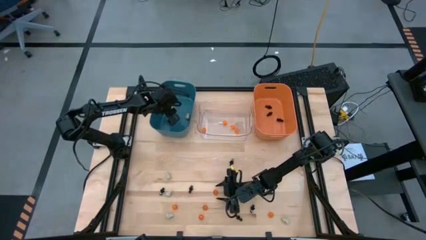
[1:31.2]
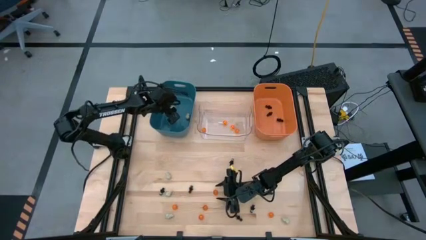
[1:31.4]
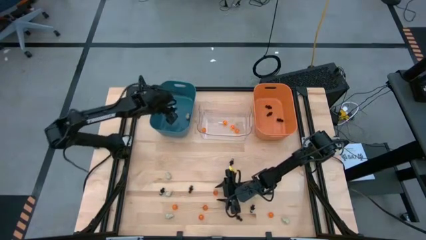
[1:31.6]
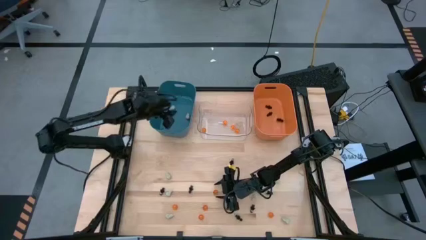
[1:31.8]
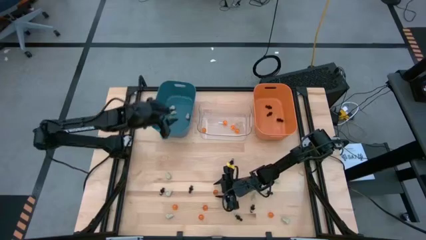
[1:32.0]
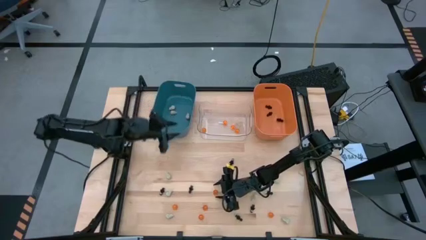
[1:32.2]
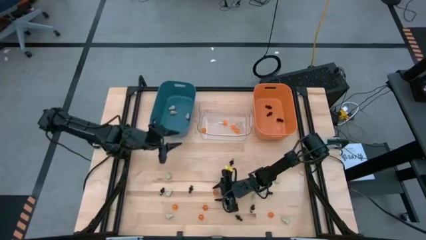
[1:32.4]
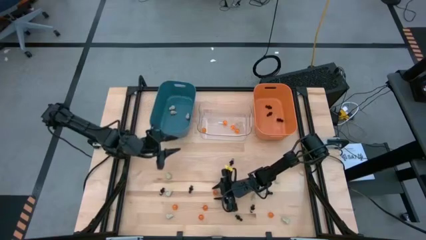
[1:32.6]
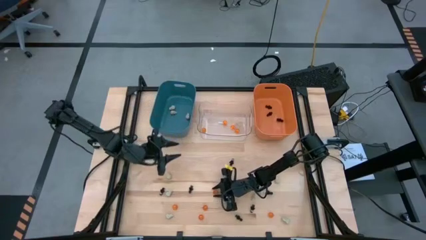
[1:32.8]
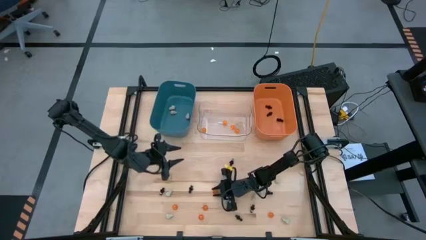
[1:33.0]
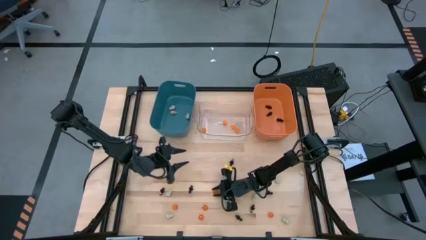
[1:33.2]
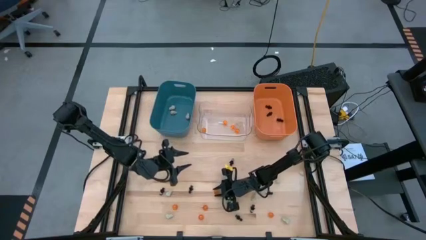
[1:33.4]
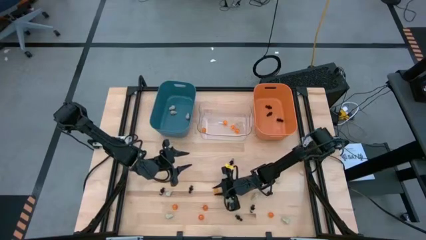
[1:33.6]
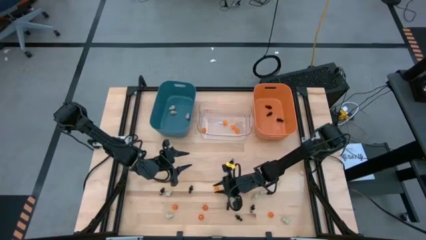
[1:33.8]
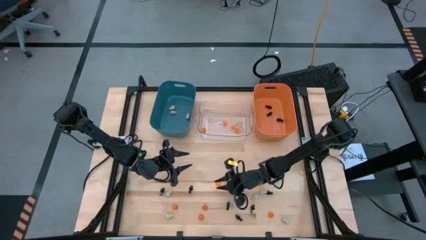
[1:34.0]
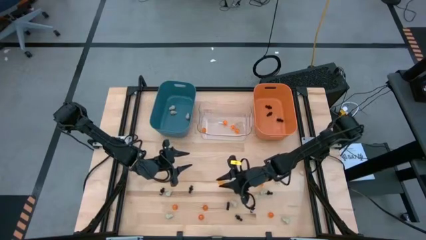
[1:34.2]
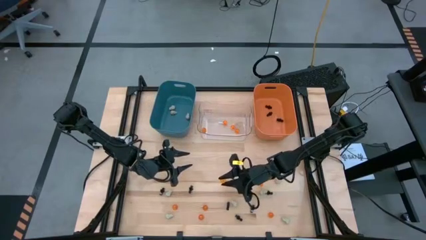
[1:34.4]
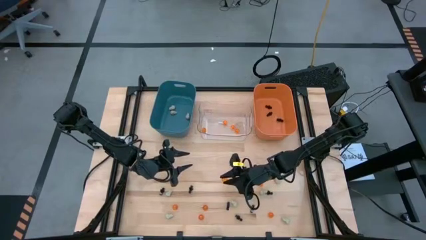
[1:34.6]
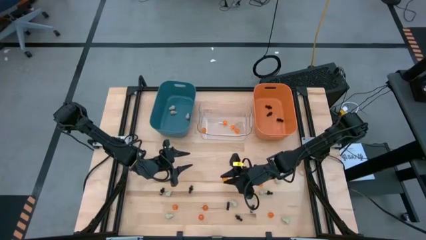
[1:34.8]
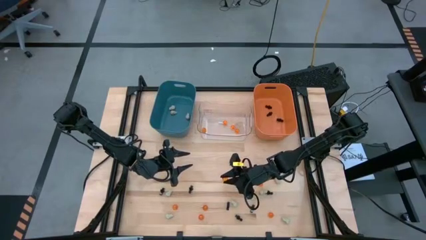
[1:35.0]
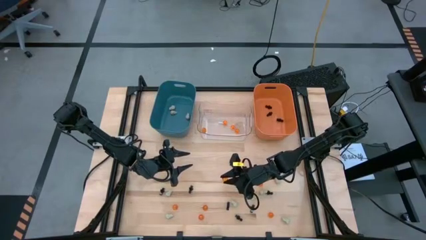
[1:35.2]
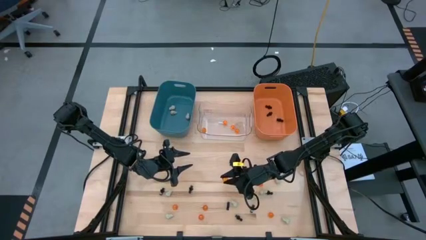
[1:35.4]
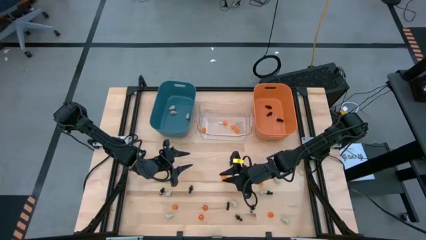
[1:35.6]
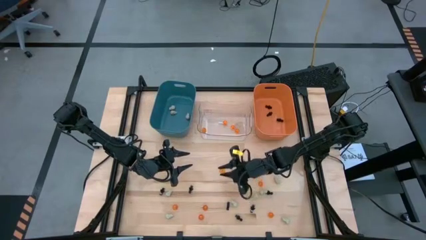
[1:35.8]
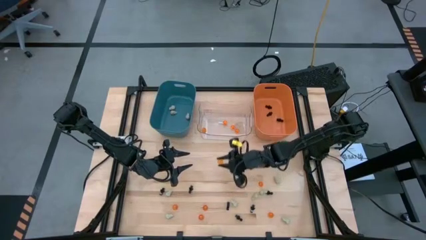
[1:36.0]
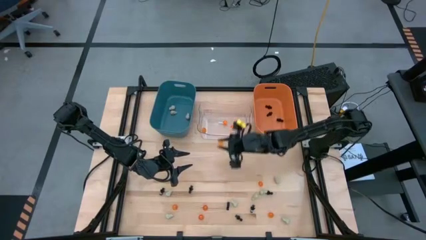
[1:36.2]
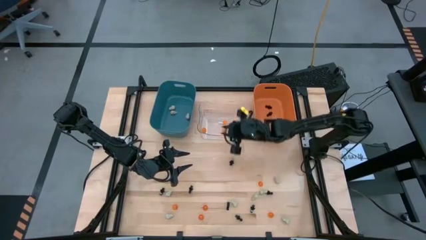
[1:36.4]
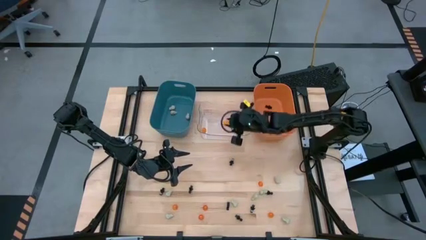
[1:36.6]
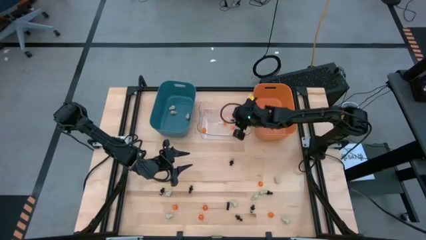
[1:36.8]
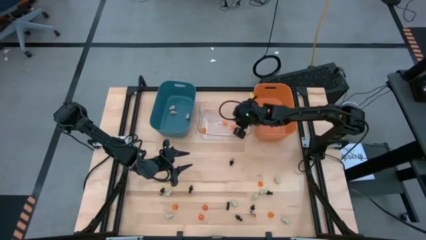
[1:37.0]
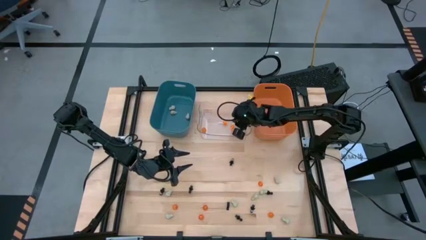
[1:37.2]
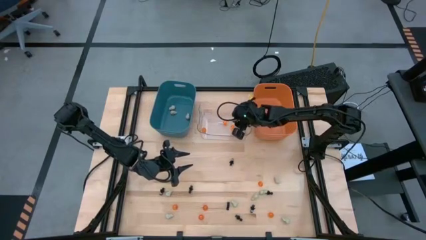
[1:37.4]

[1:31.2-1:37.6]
Task: Sort Halloween decoration
Put the orange pumpkin toy into the transparent bin

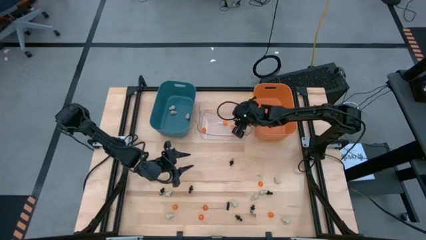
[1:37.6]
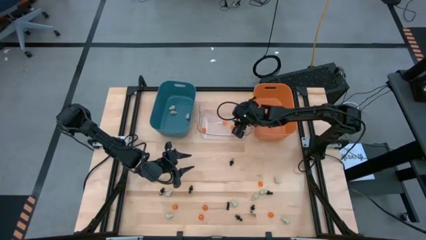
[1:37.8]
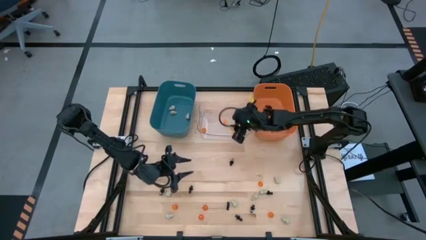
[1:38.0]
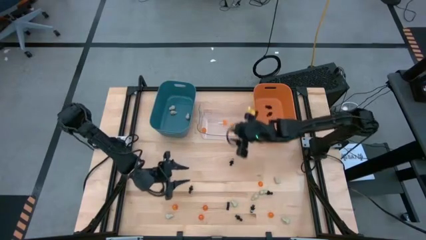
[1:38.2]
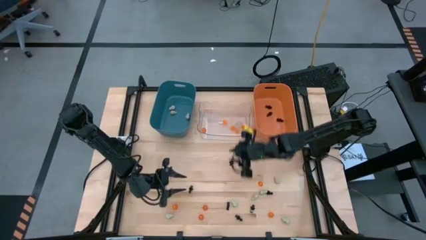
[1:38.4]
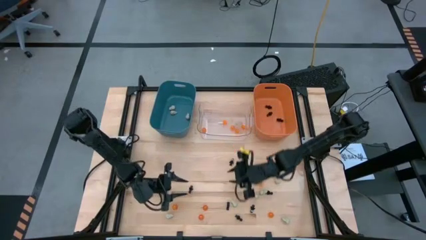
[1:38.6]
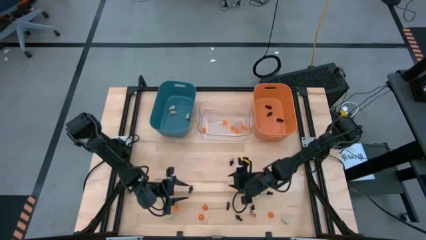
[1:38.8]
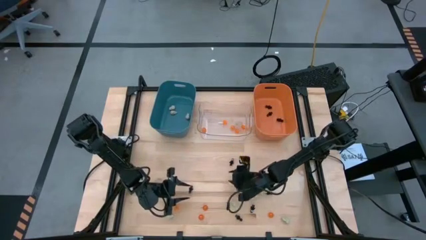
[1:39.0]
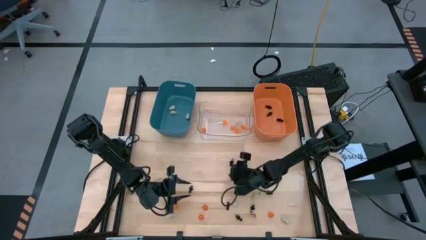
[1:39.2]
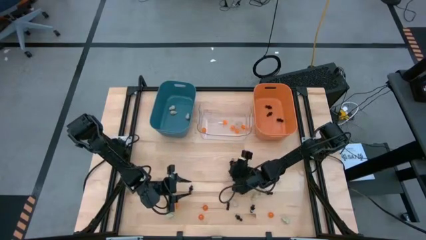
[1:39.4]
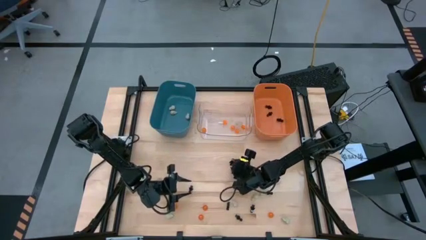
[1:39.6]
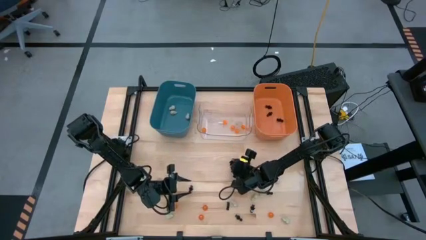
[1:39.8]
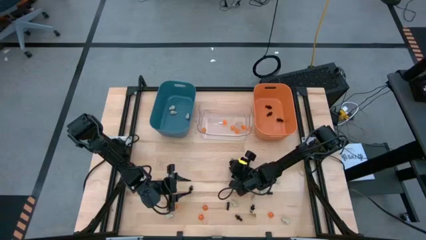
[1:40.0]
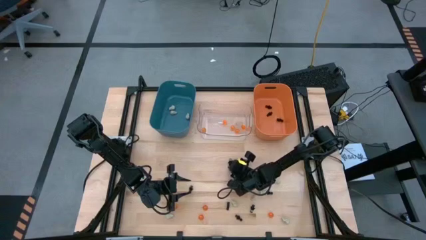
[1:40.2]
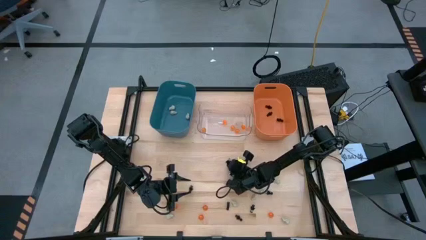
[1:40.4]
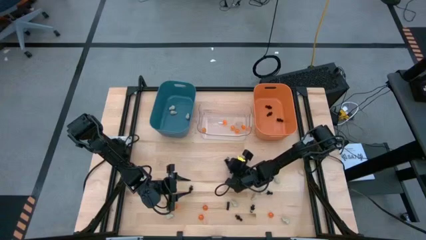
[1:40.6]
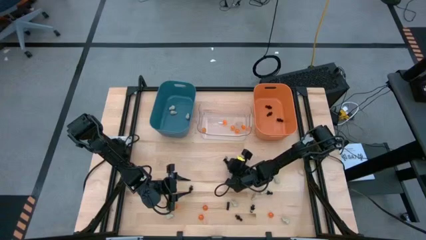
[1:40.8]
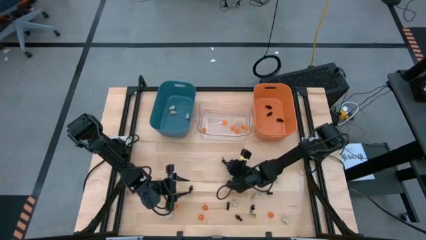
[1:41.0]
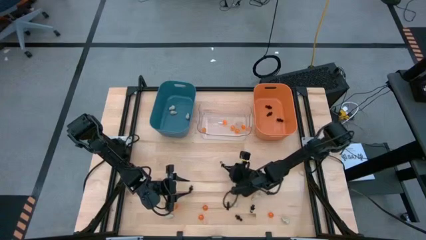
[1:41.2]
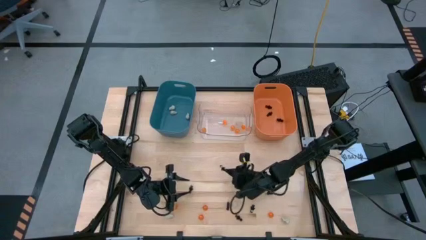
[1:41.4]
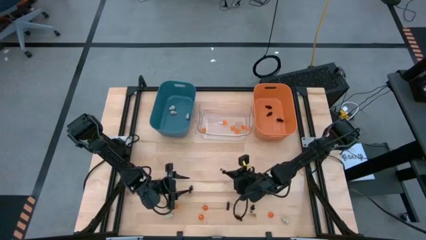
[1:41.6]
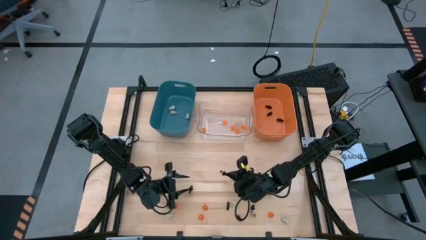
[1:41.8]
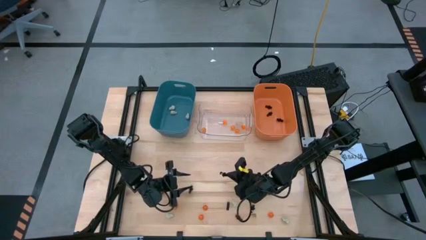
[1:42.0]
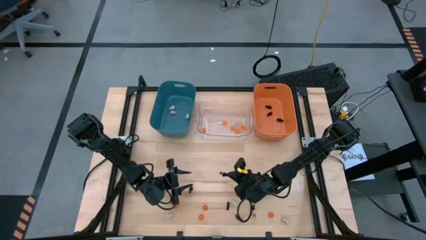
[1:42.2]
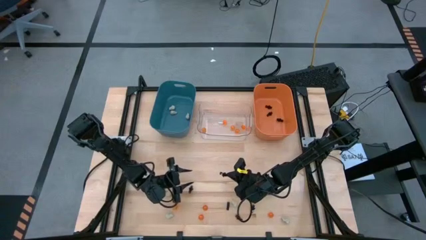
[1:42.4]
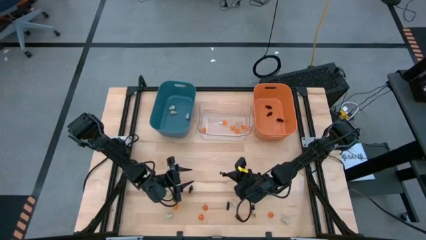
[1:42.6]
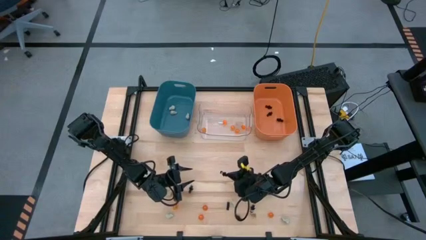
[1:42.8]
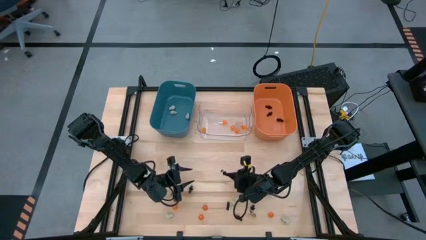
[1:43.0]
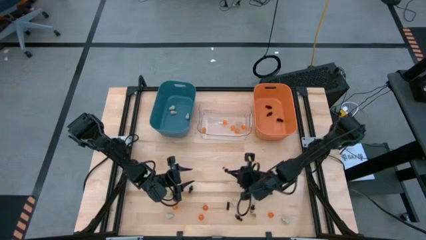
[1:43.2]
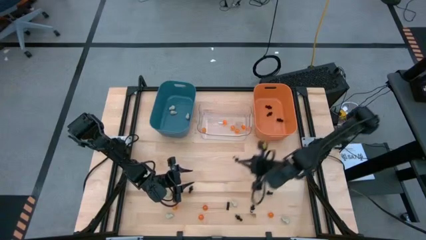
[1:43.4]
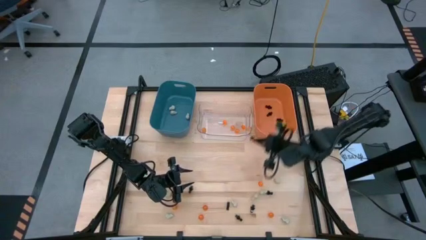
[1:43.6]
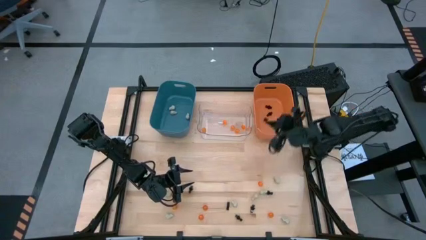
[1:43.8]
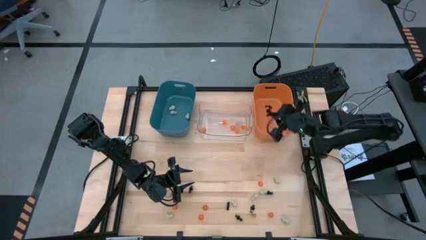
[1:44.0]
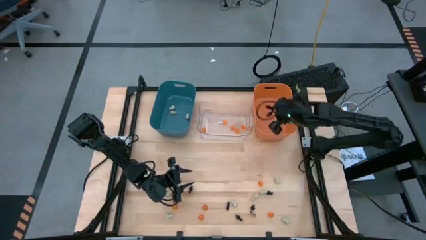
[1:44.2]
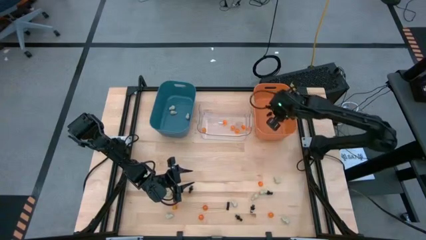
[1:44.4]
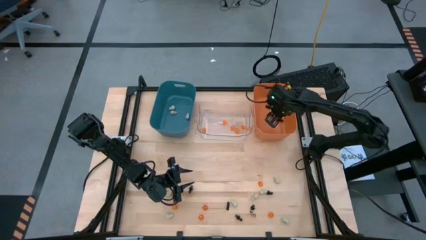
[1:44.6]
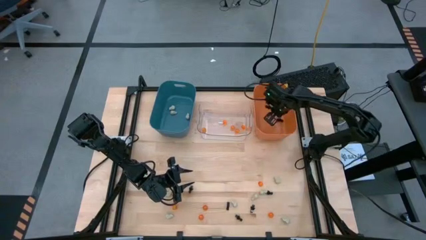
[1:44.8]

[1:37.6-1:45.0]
Put the black skeleton toy into the orange bin

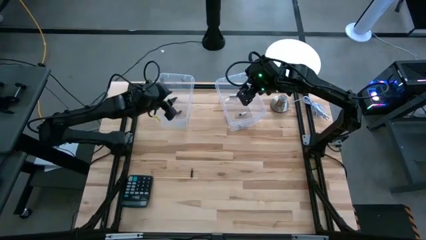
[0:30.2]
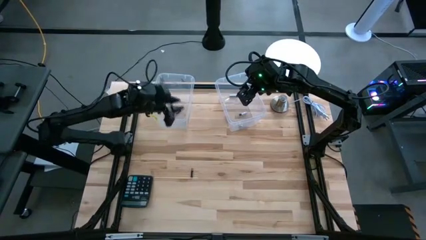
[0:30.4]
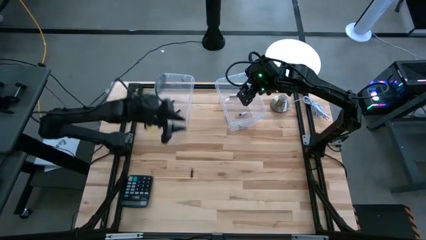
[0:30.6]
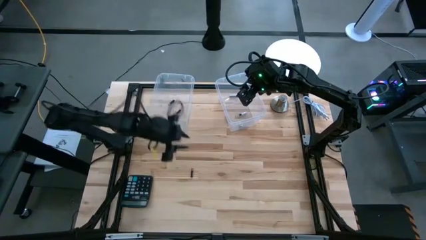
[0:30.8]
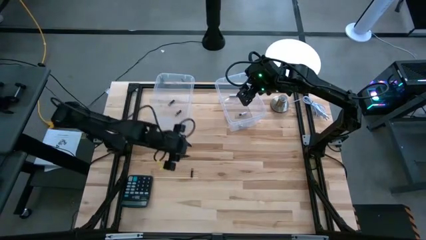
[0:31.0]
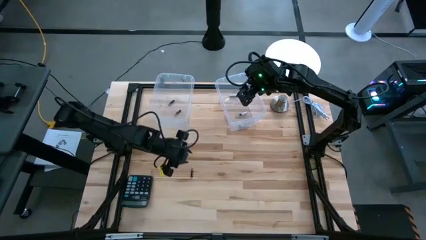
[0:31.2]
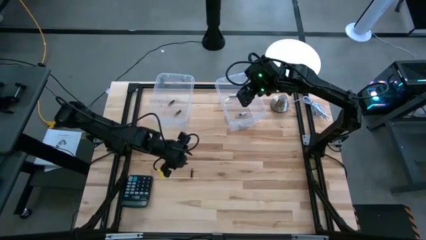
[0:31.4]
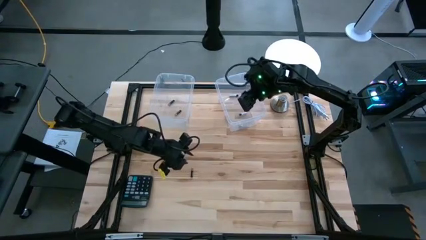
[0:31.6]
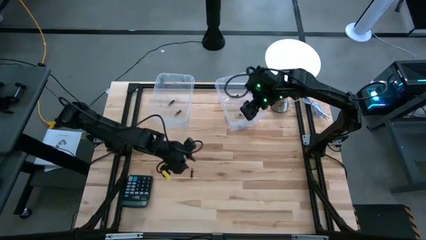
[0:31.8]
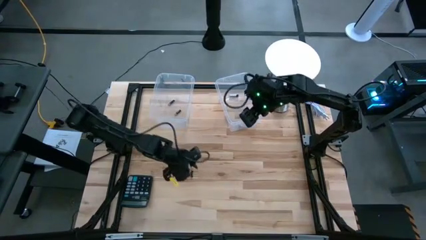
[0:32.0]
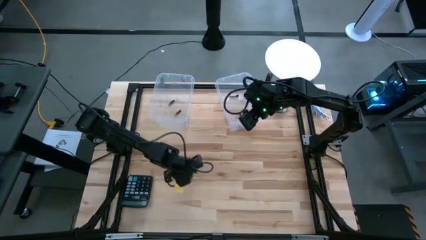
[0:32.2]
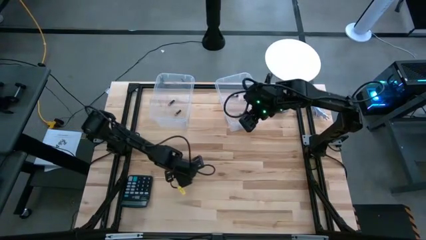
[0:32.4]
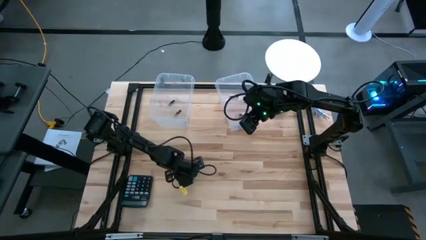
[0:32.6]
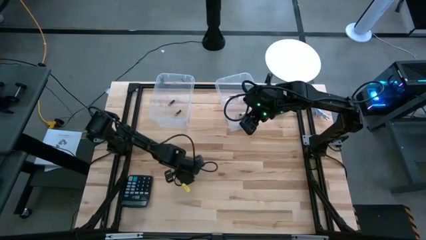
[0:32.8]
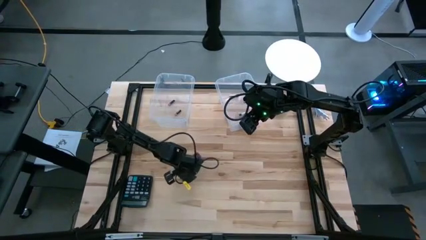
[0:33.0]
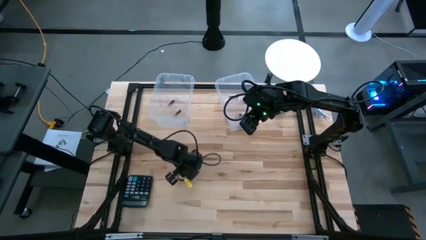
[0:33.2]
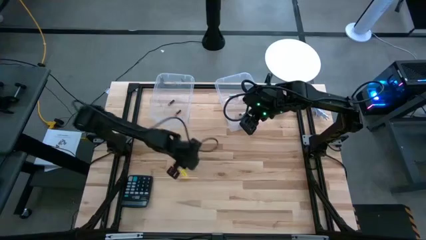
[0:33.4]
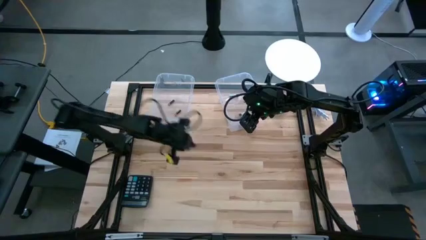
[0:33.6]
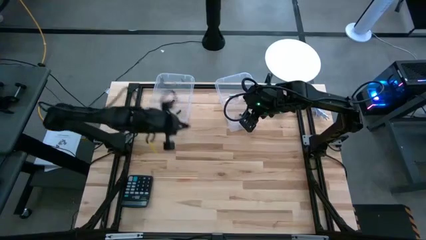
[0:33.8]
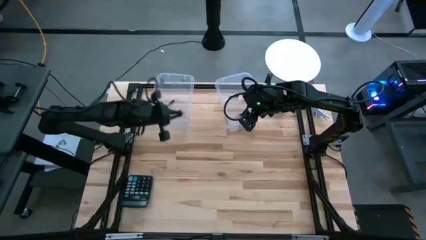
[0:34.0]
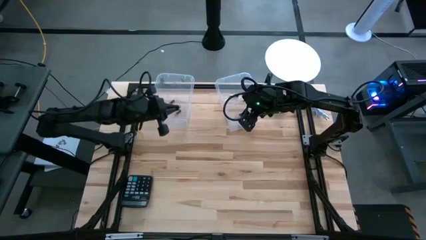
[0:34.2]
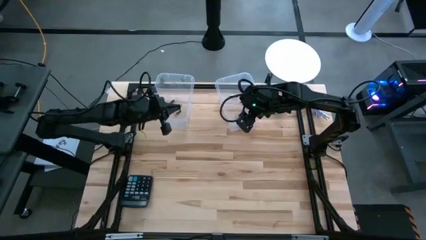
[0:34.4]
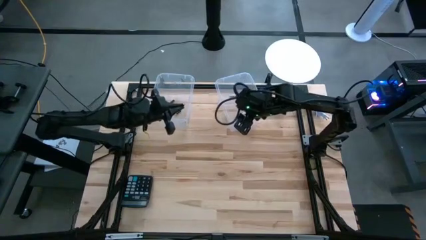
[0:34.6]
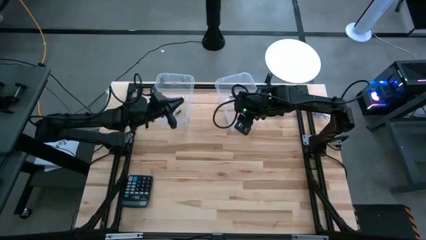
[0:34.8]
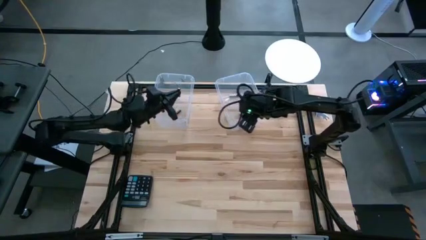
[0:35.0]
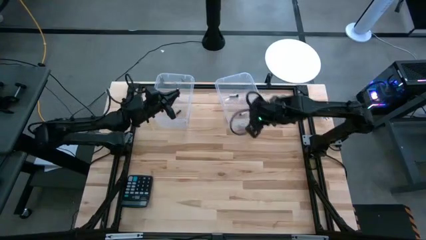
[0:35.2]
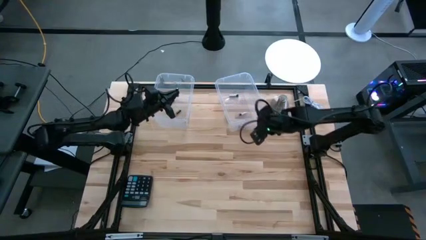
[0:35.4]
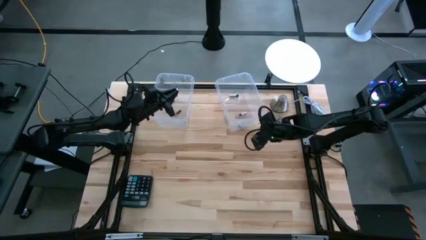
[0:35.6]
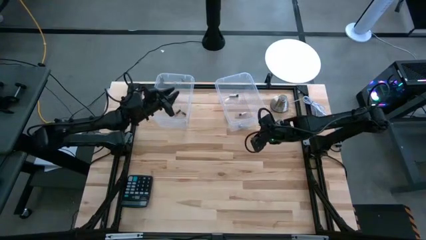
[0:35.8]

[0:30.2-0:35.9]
Task: Sort batteries
Put the black battery into the left transparent bin
